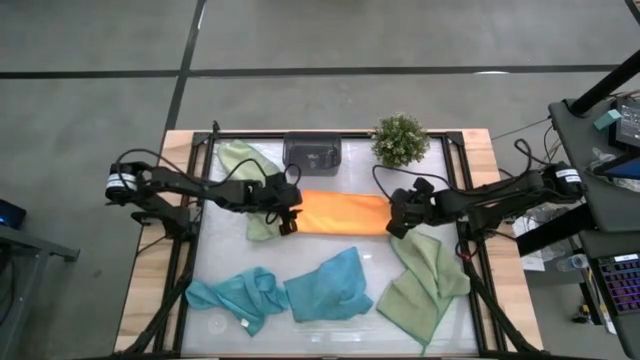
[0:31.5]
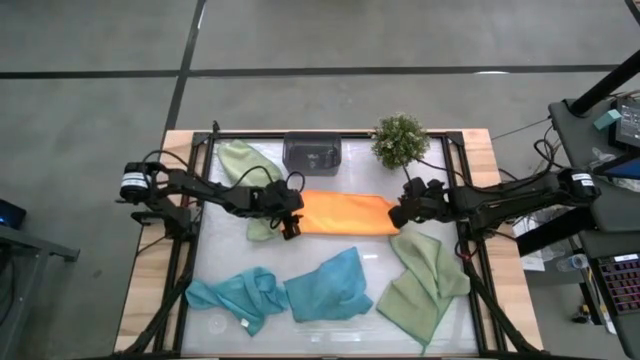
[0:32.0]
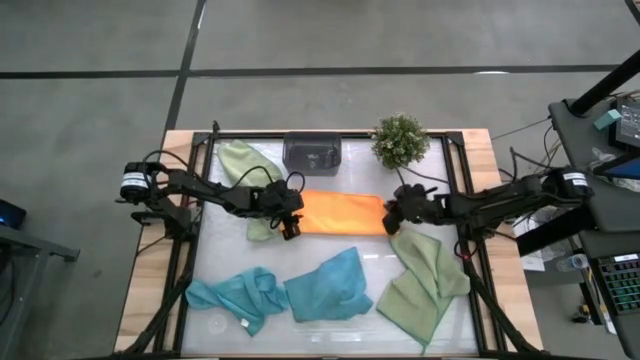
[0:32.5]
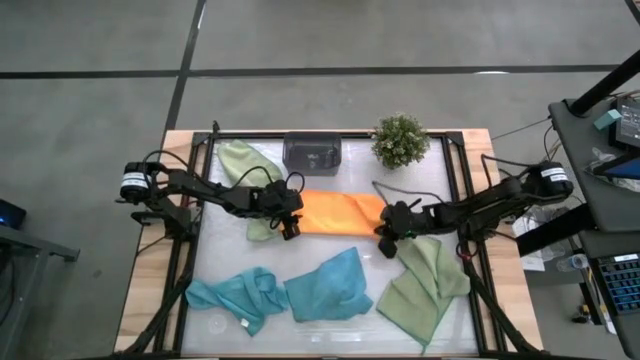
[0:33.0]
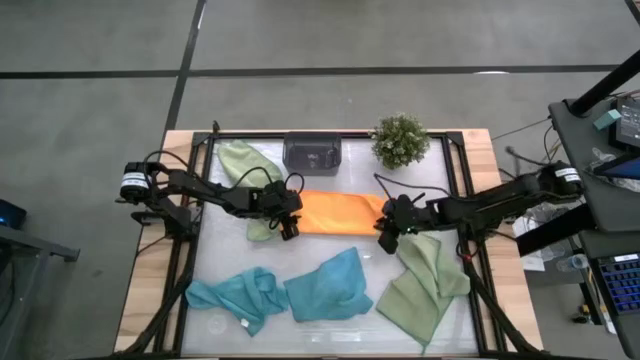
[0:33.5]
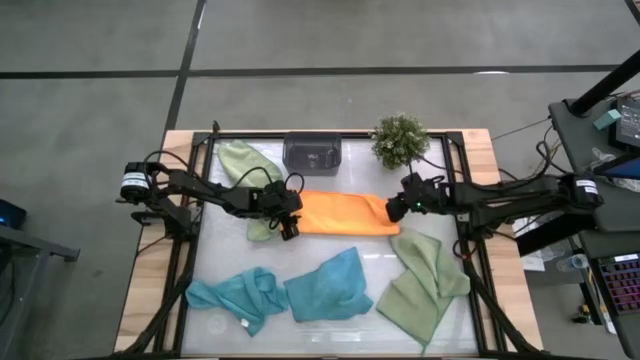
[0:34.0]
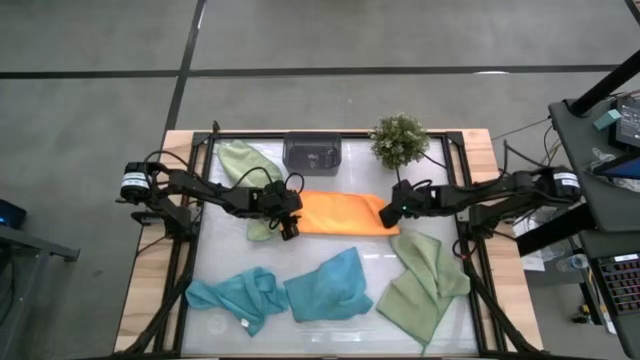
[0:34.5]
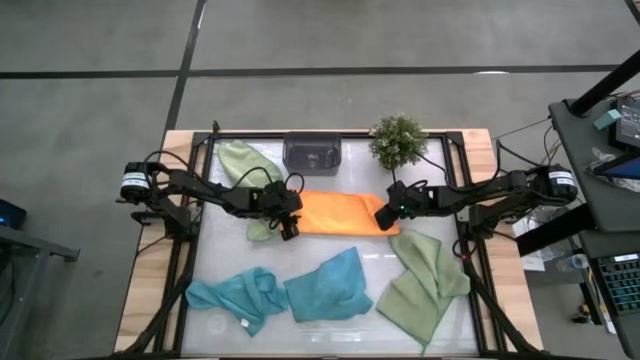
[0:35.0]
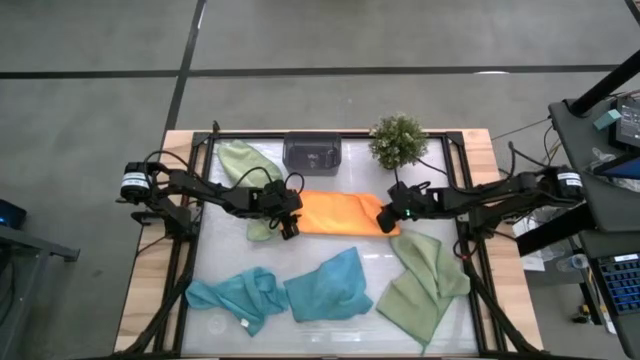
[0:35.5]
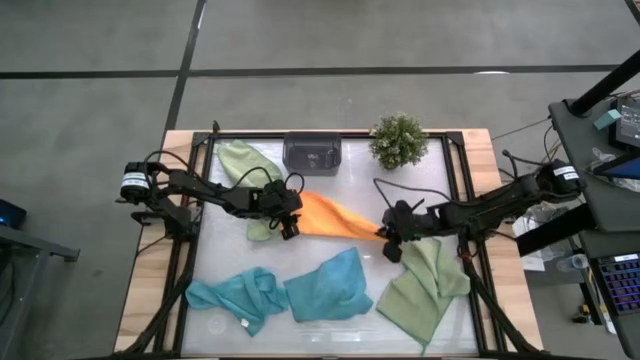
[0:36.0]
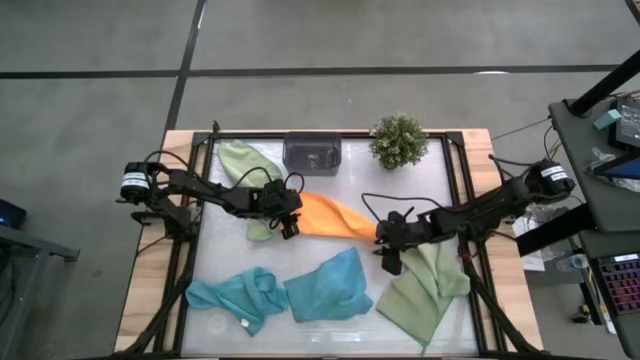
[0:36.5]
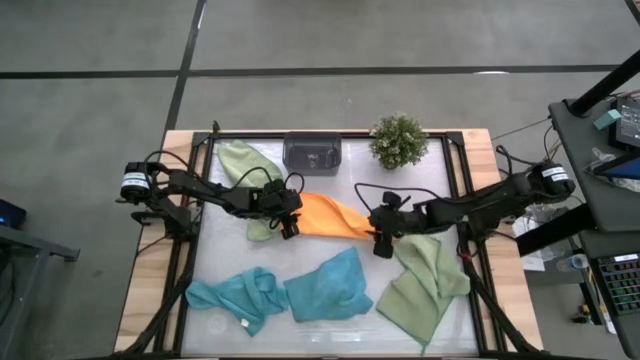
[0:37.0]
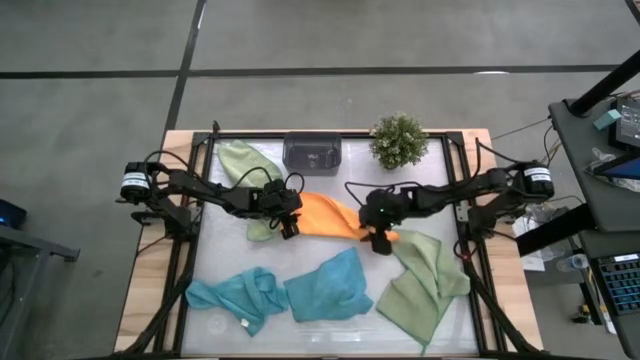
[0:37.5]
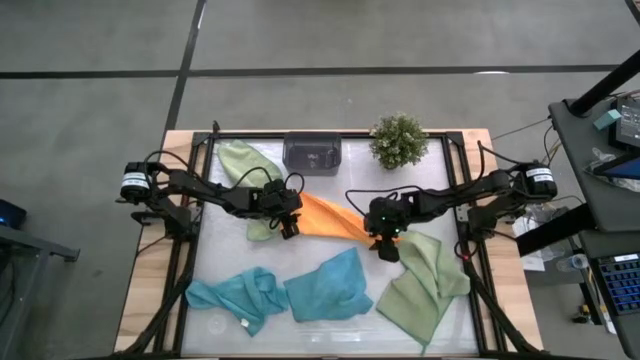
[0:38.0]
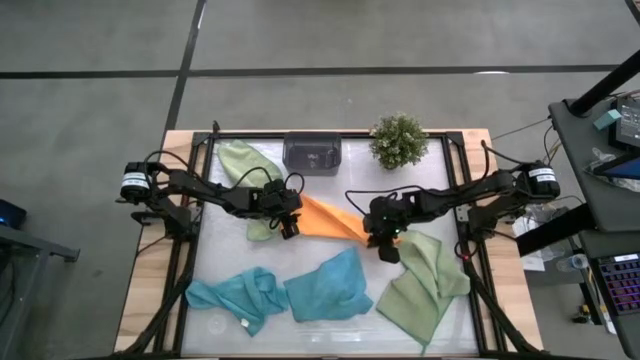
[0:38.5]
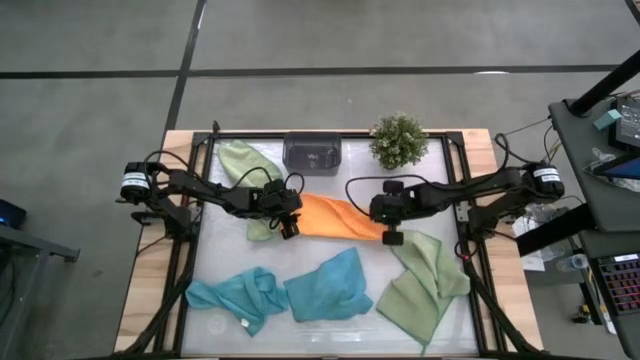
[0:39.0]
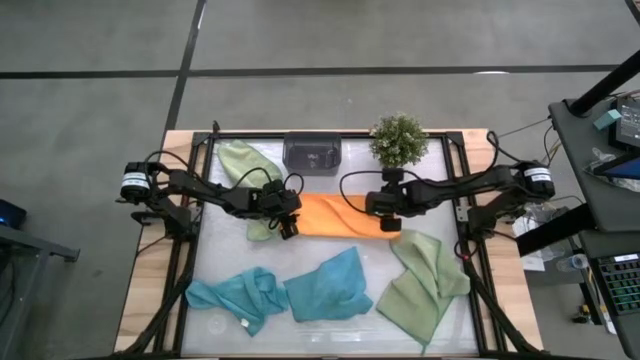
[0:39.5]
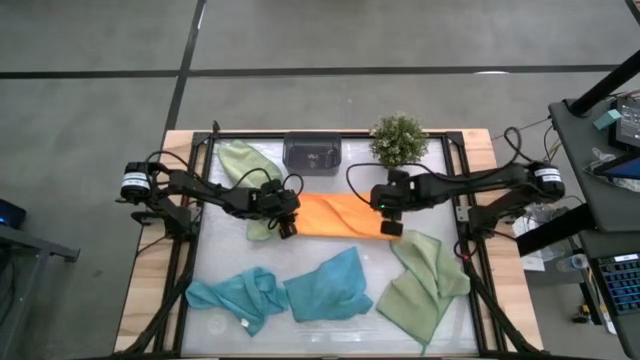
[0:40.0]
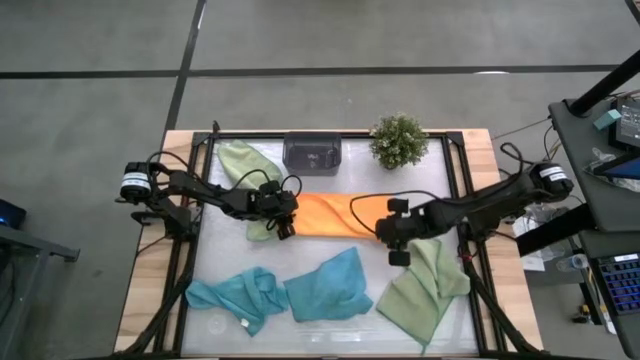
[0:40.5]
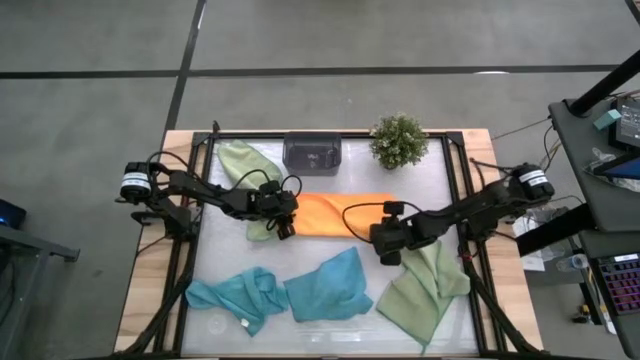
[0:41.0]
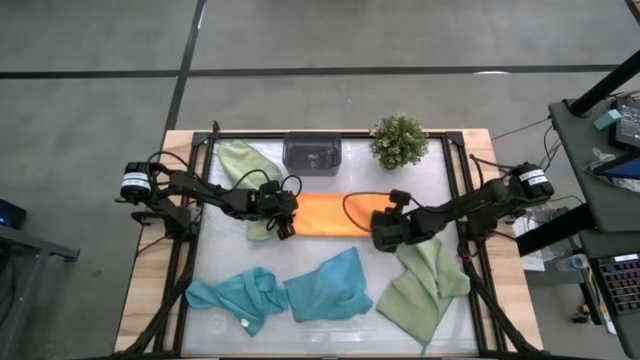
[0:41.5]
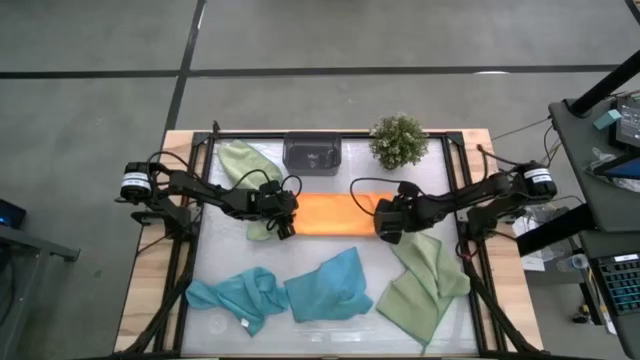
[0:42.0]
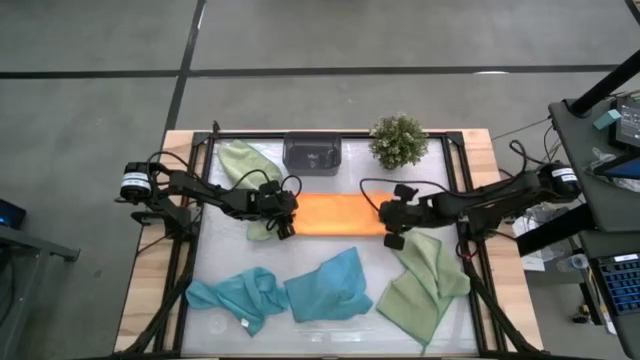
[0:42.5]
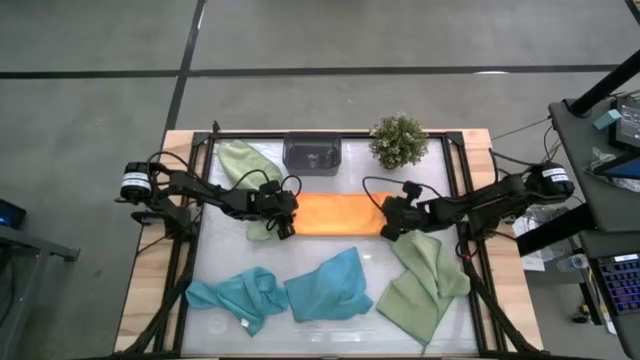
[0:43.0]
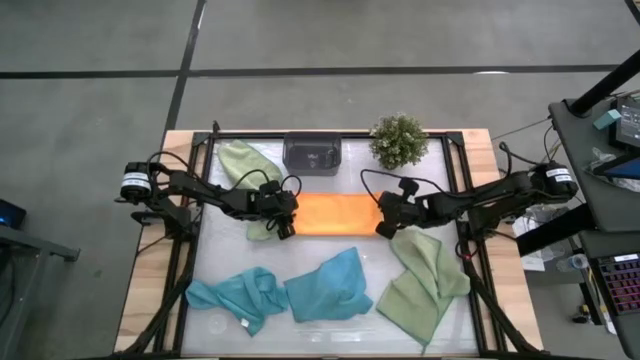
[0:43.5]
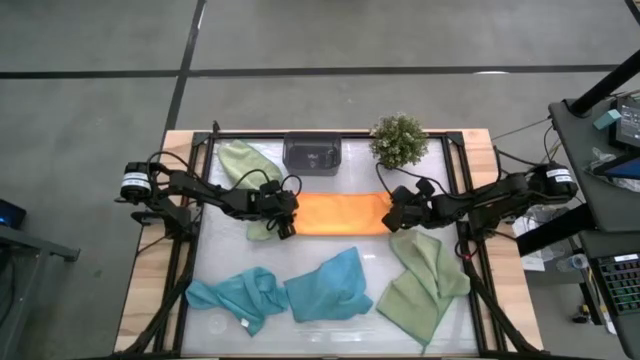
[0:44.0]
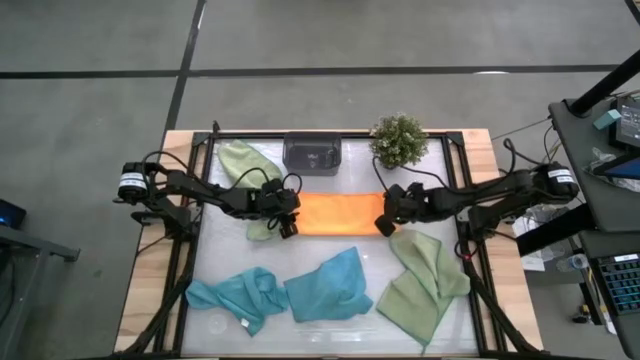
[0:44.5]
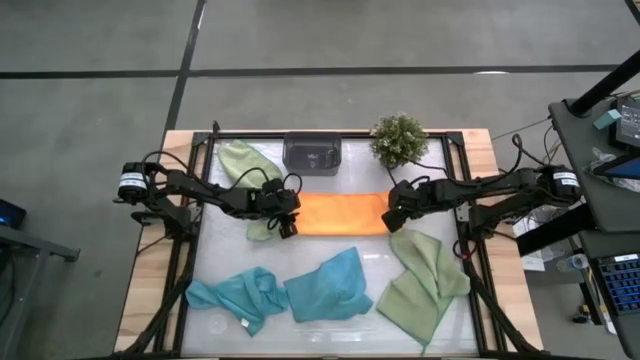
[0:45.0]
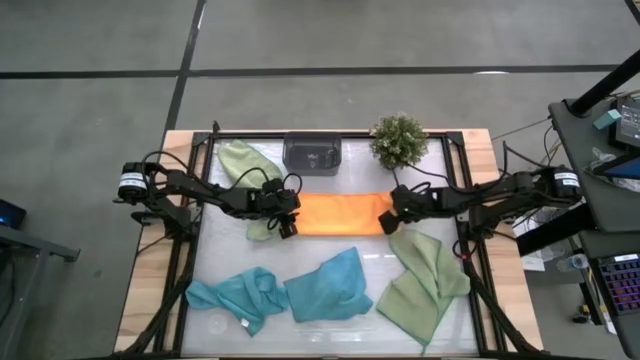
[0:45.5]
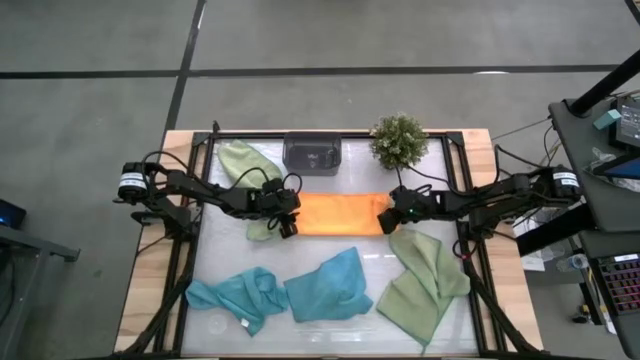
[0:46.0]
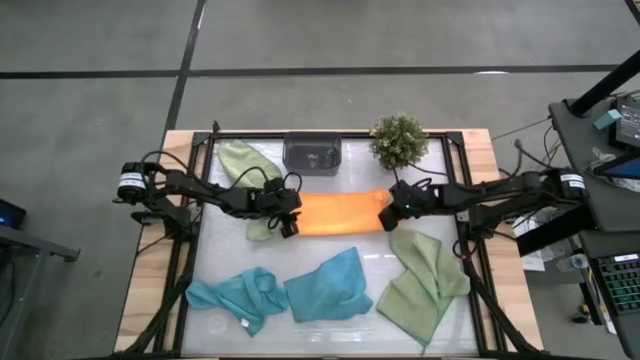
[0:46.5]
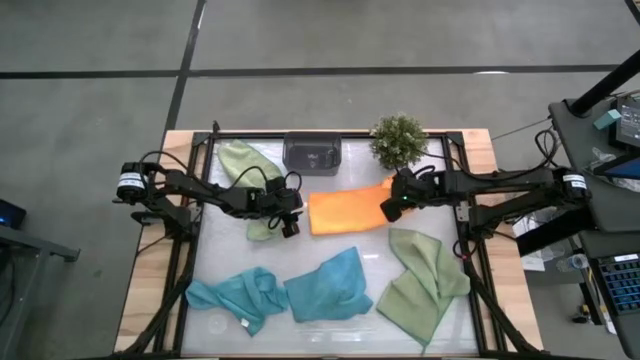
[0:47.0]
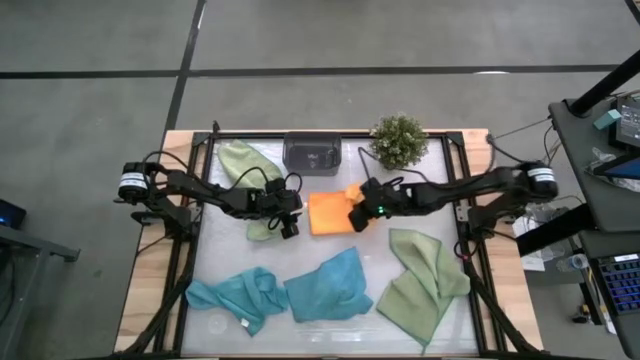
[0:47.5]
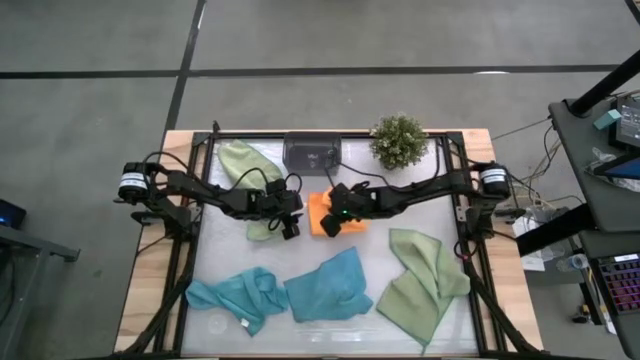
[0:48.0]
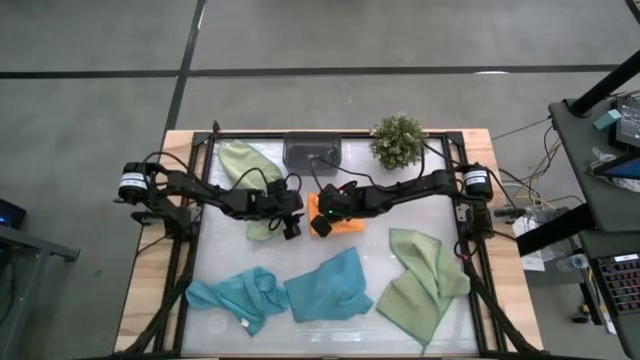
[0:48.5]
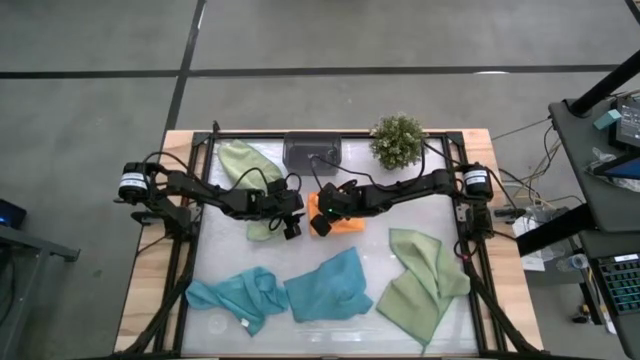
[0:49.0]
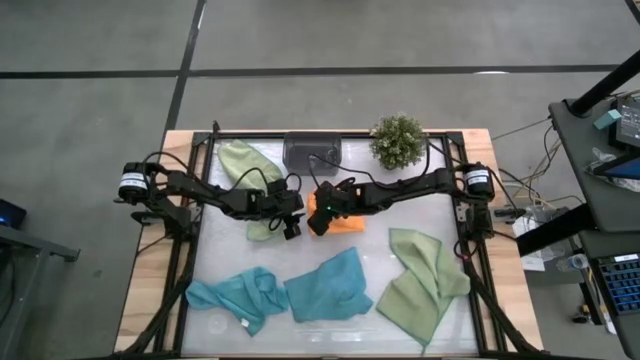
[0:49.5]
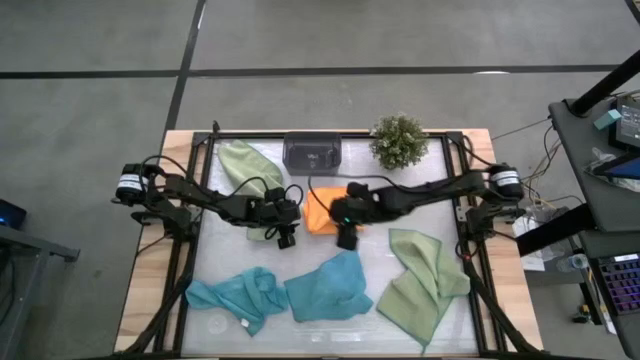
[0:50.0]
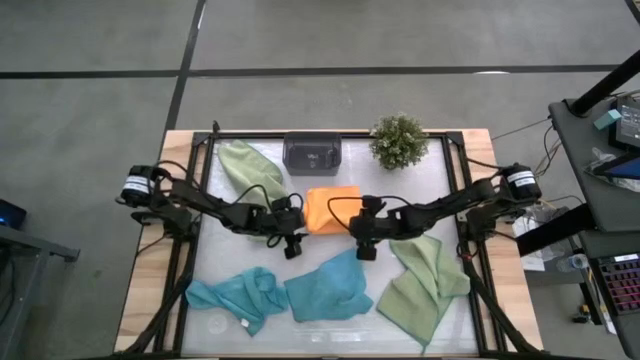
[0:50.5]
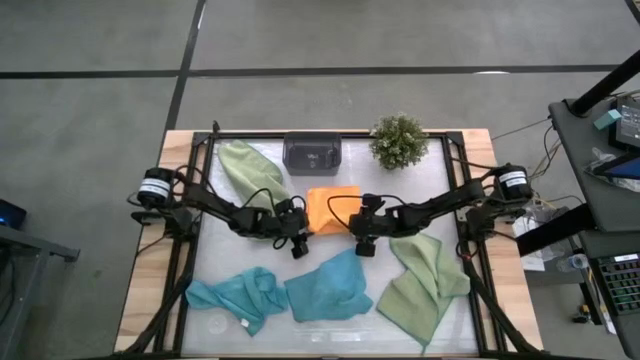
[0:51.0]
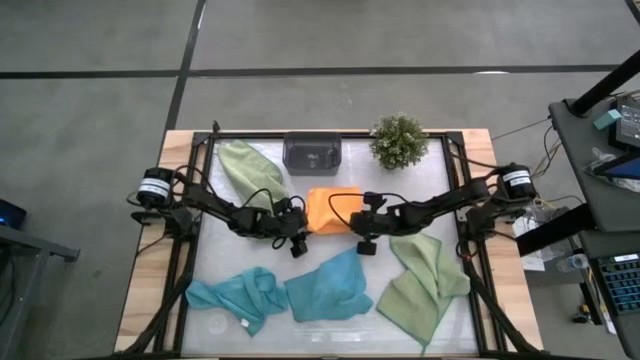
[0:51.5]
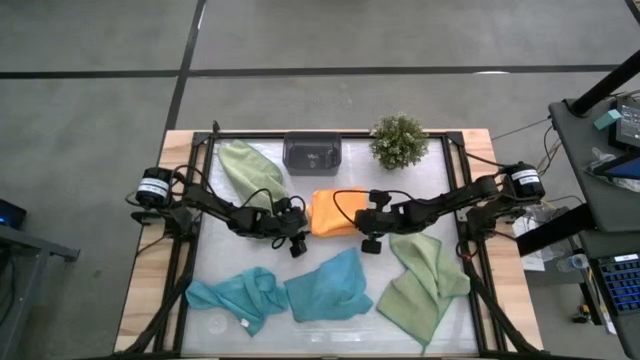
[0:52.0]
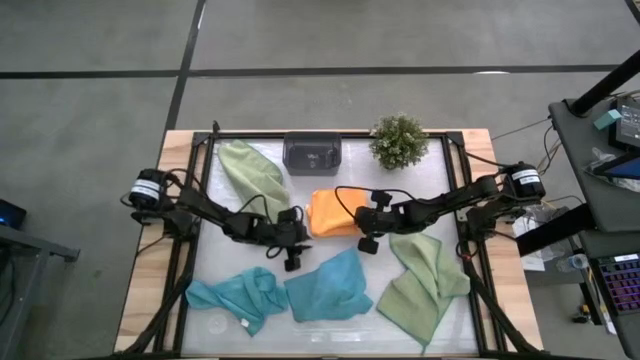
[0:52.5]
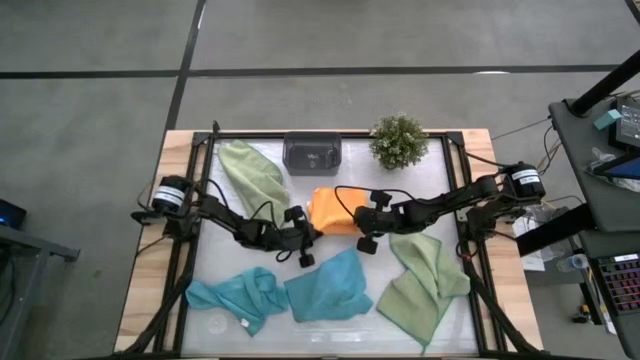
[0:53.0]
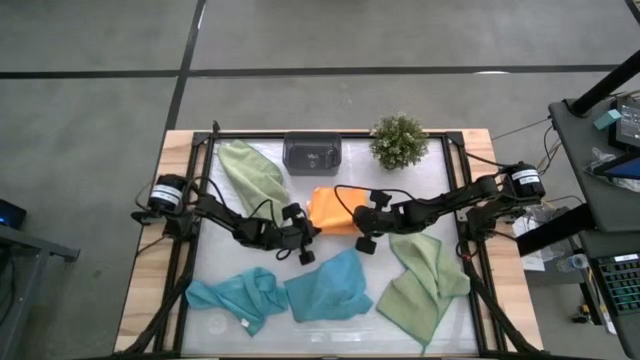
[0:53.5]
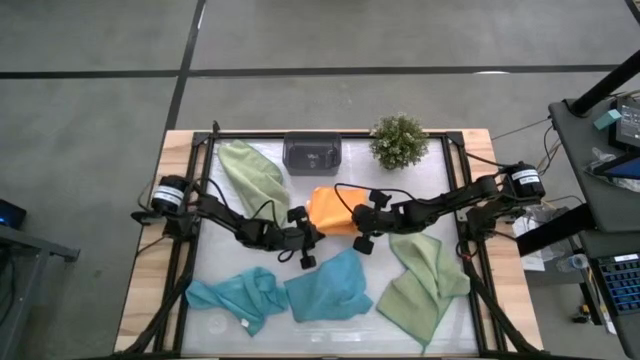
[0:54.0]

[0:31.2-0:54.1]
Task: Fold microfiber towels
Fold the orange microfiber towel
